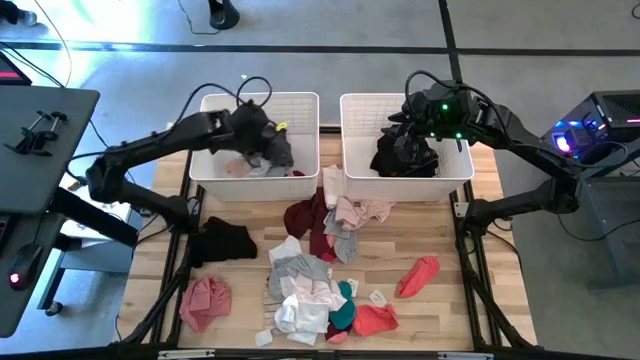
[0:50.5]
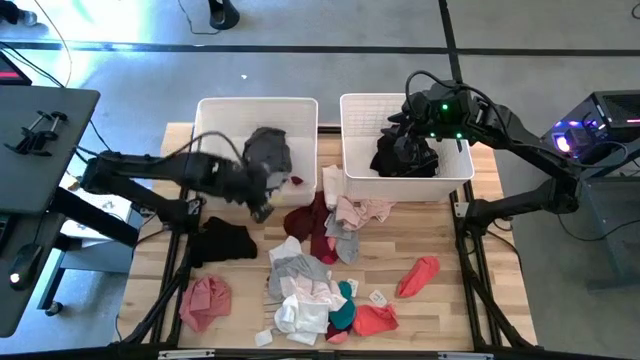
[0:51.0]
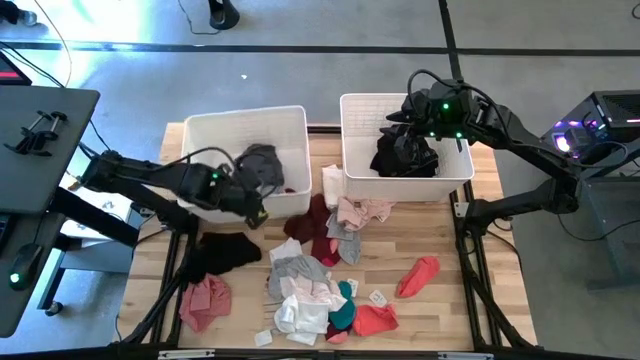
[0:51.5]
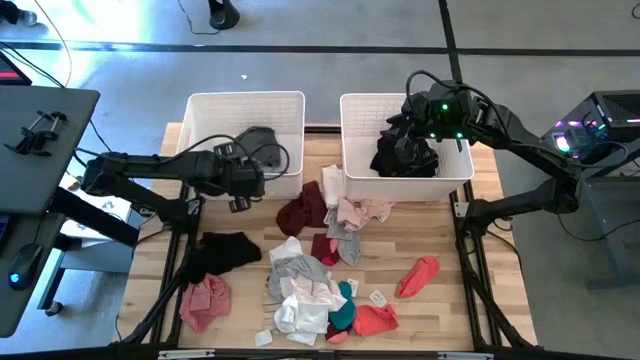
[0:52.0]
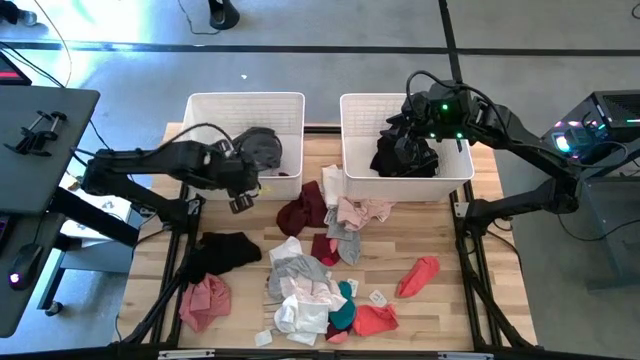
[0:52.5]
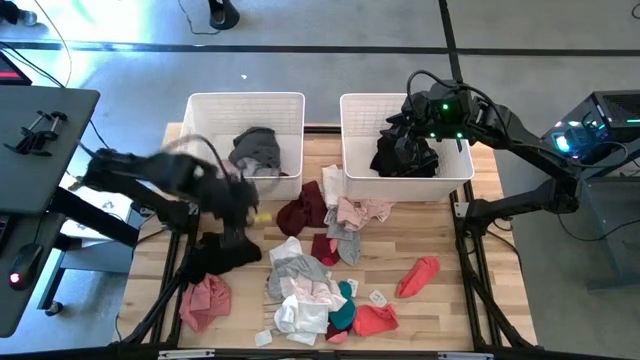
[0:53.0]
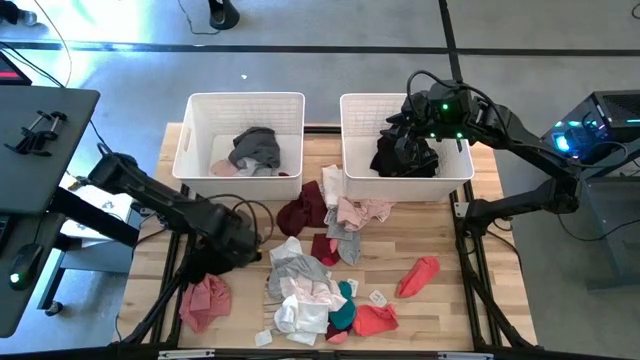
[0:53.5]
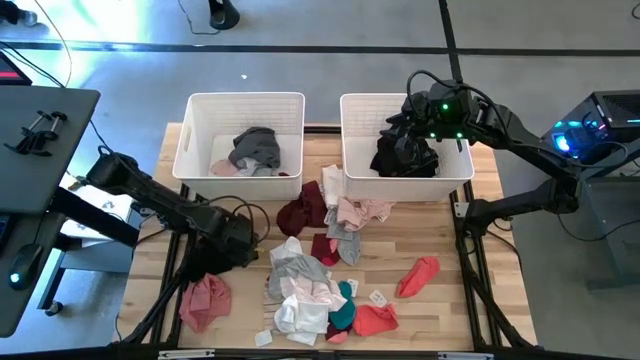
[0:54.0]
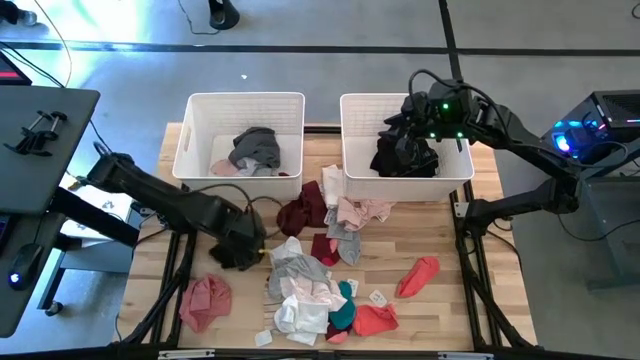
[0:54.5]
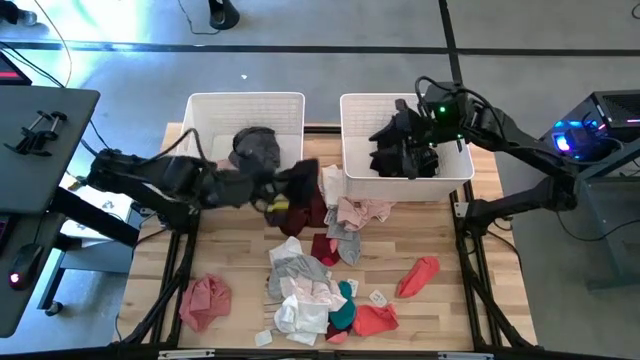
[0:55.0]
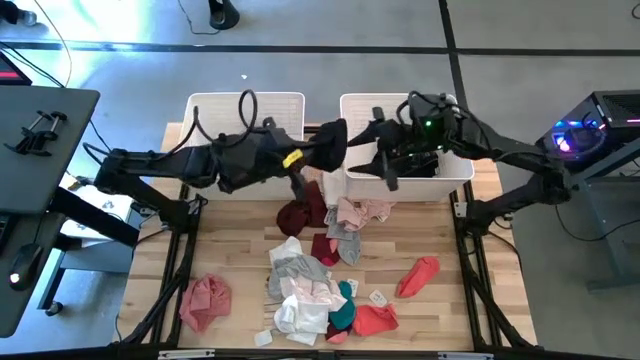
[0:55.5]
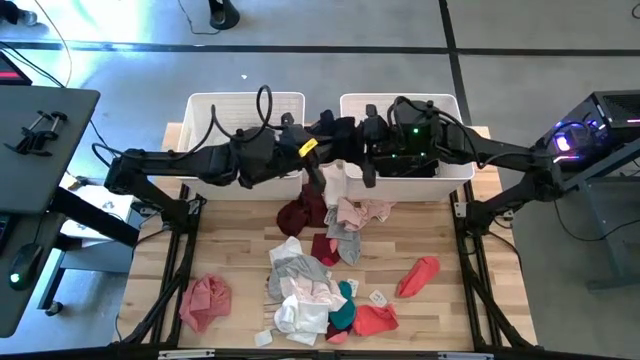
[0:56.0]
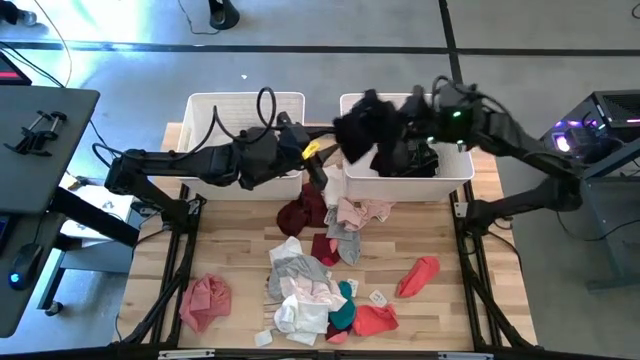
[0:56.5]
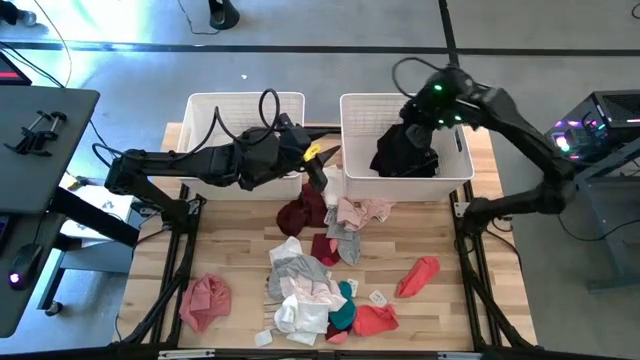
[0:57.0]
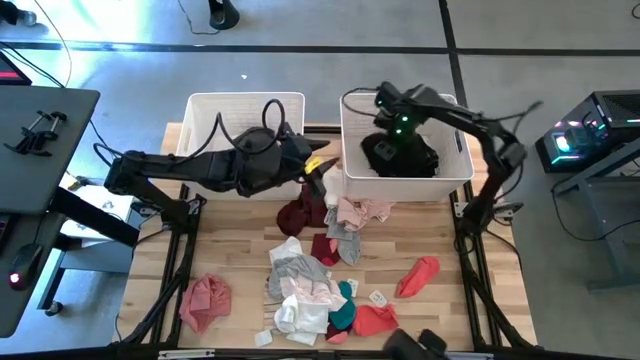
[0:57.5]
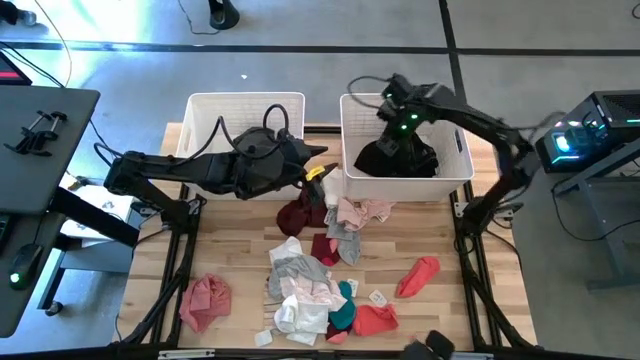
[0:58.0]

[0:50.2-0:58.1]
Task: Sort clothes
Put the black underwear into the right white laundry bin

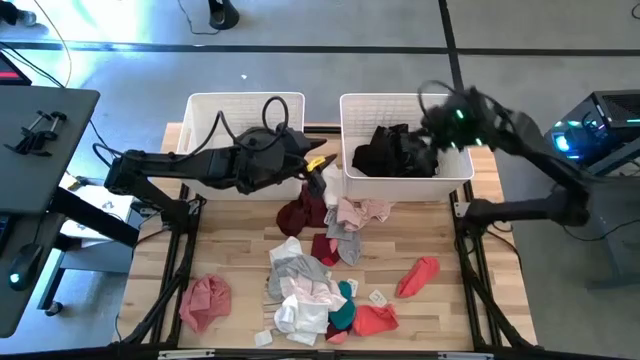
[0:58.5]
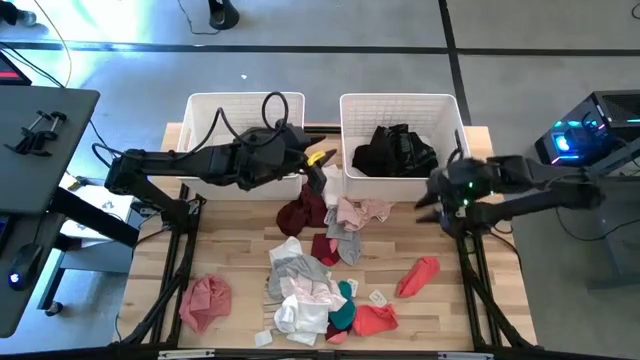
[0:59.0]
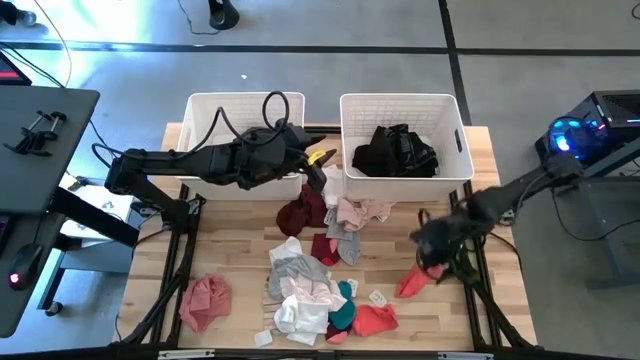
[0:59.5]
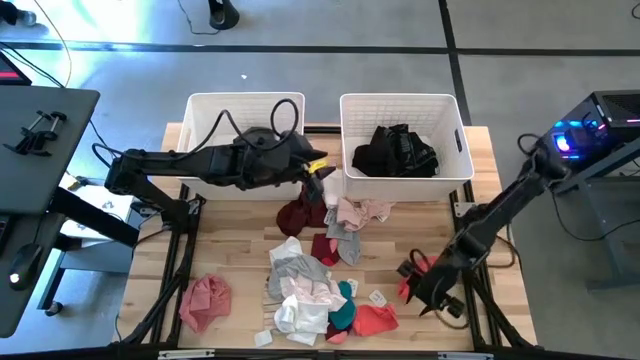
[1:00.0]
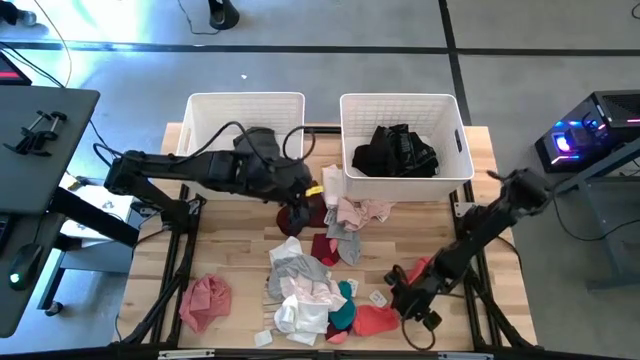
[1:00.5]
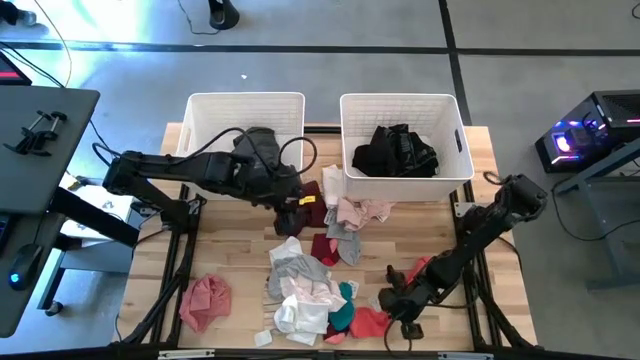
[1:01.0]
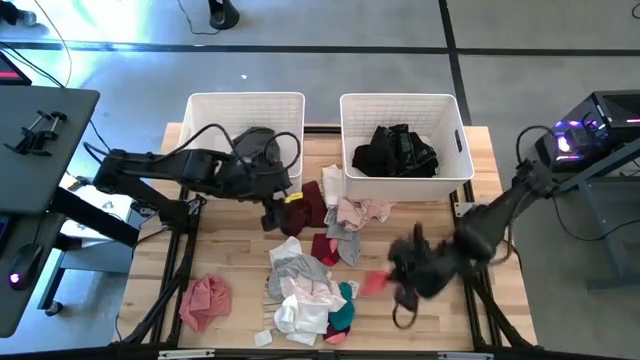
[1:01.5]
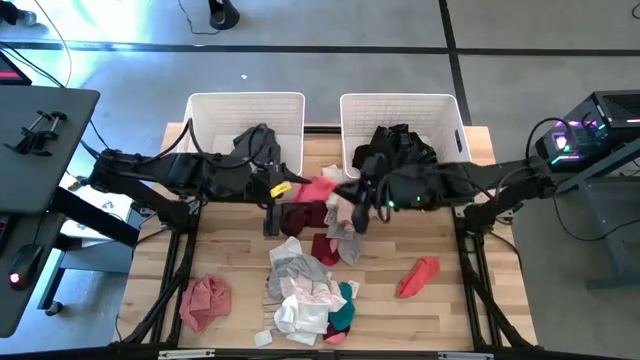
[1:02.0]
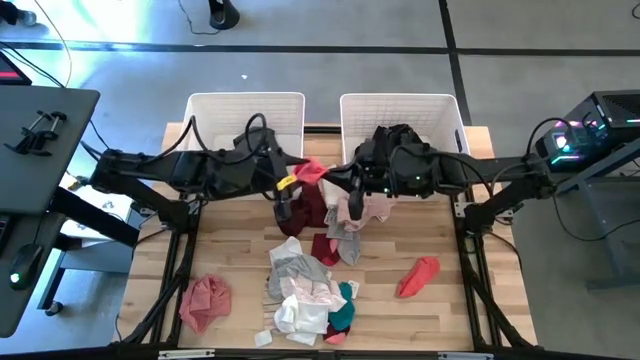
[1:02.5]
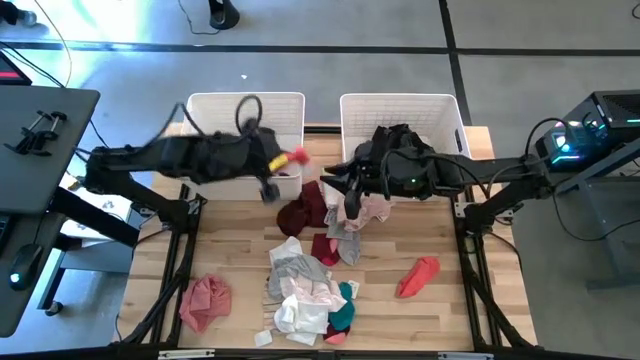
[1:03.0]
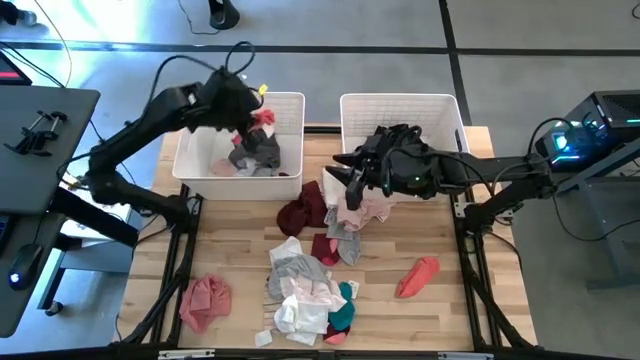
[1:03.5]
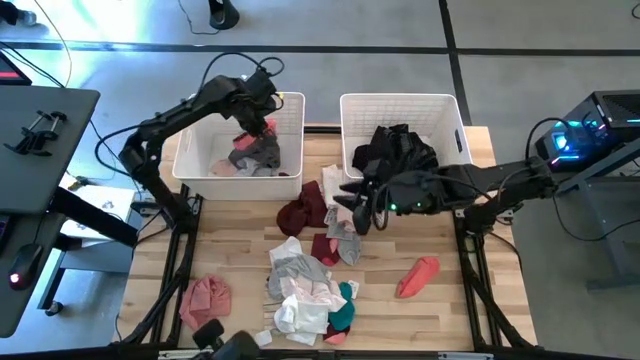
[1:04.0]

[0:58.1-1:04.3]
Put the orange sock into the left white laundry bin

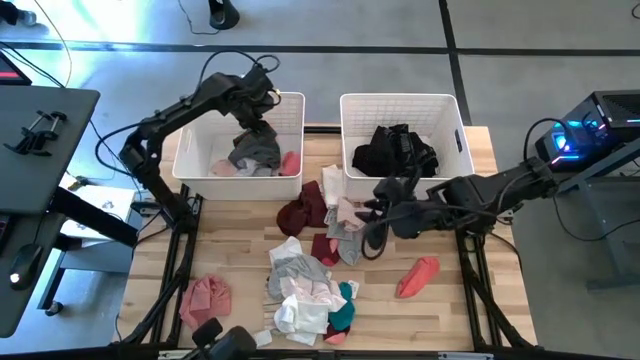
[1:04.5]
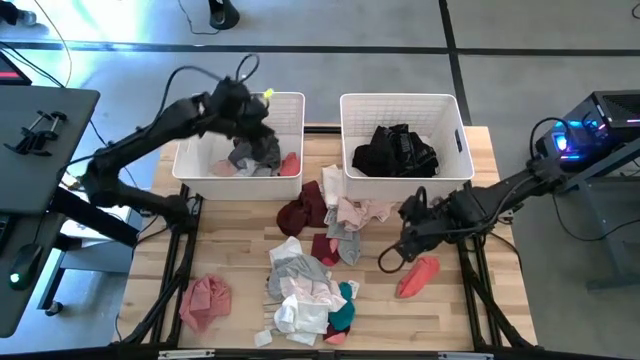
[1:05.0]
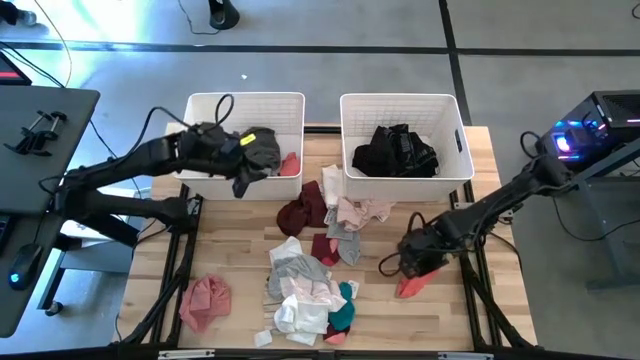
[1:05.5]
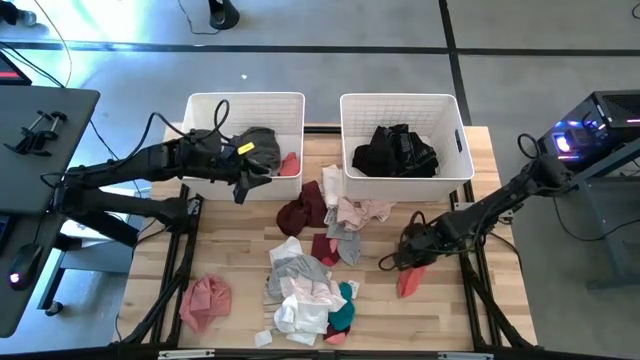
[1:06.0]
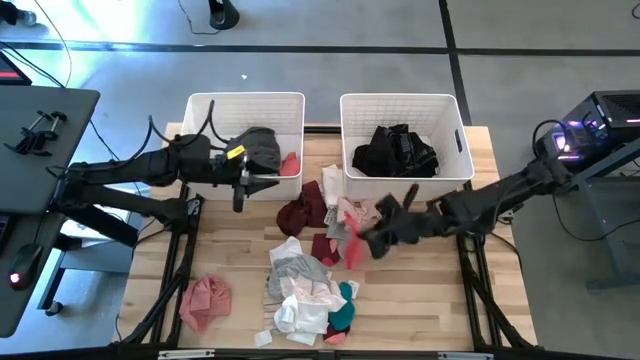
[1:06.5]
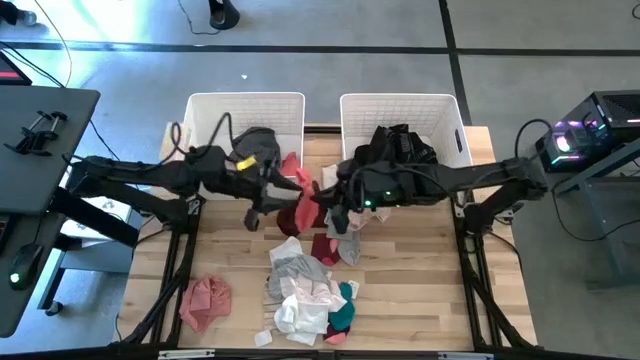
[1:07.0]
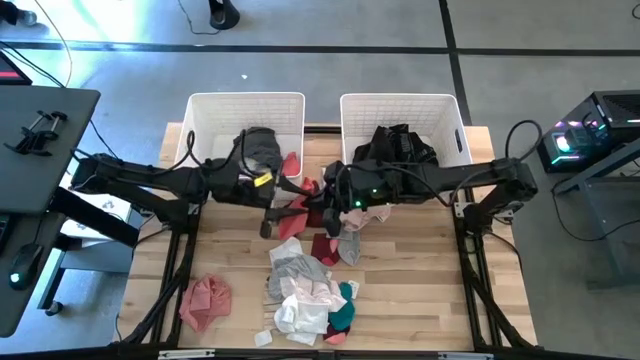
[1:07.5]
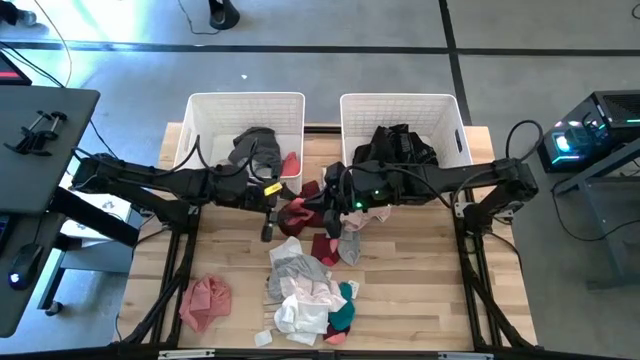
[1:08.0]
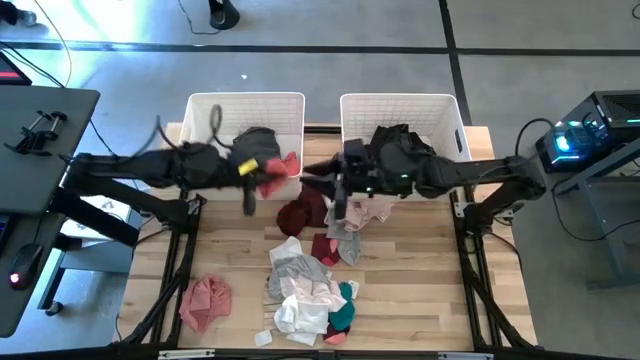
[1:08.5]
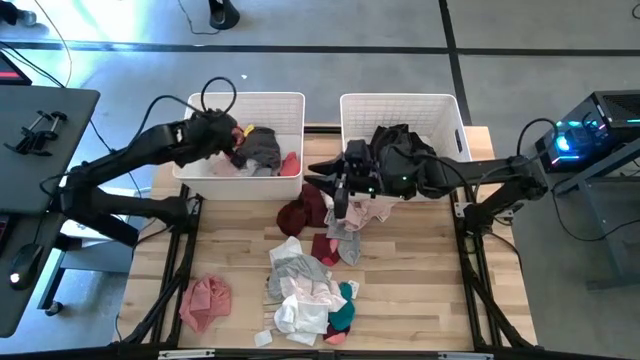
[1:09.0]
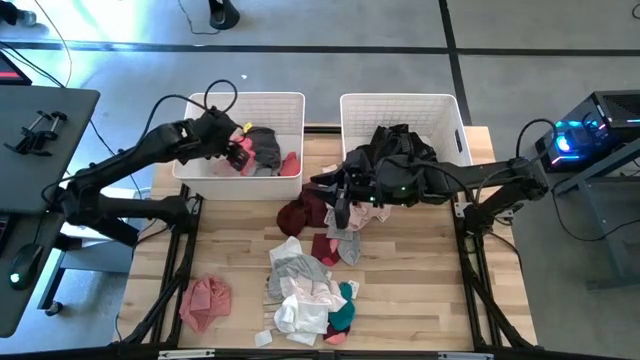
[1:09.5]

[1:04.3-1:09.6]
Put the orange sock into the left white laundry bin

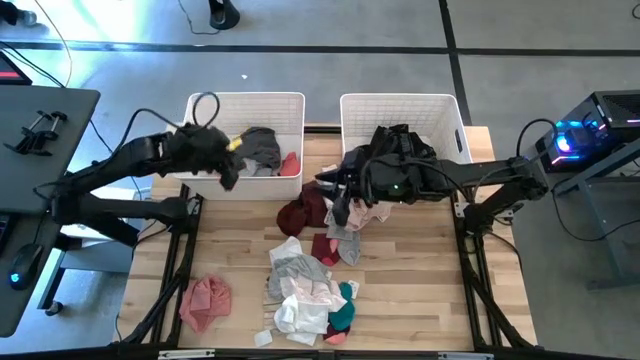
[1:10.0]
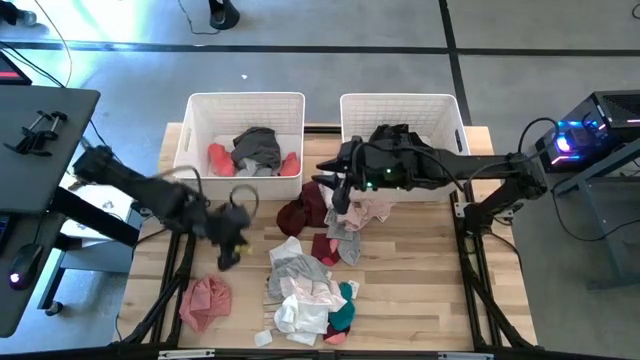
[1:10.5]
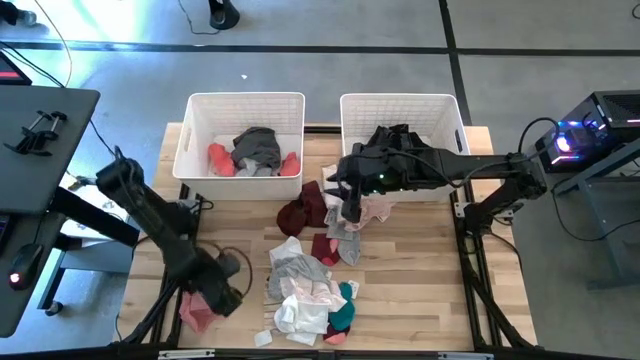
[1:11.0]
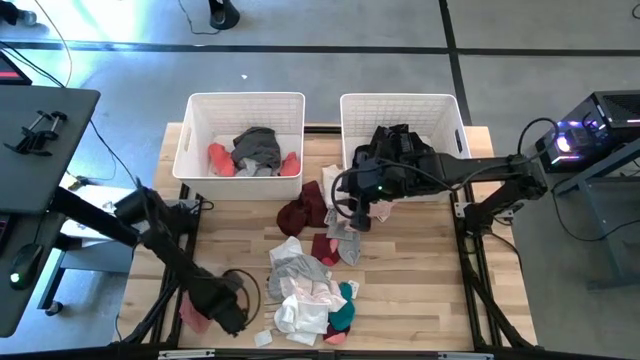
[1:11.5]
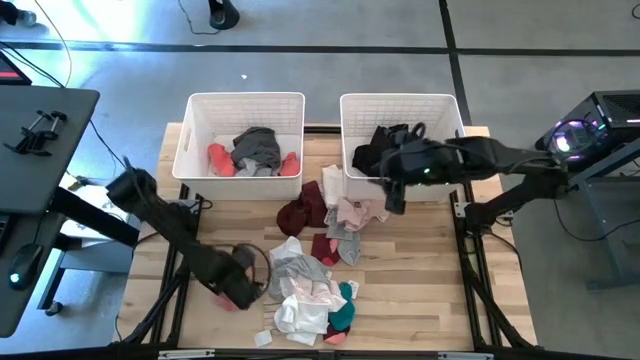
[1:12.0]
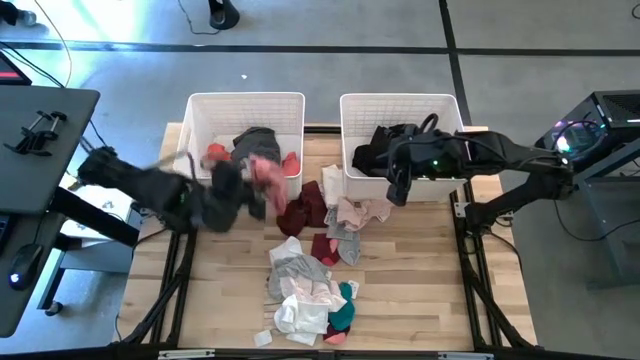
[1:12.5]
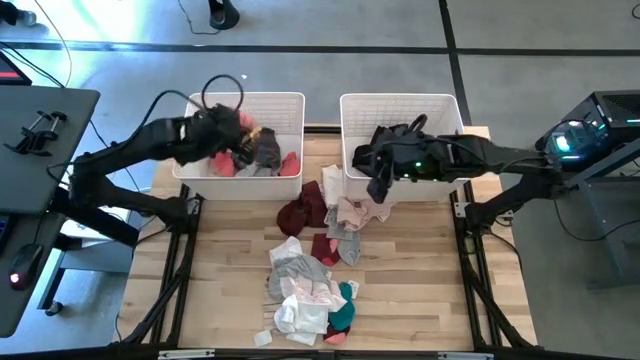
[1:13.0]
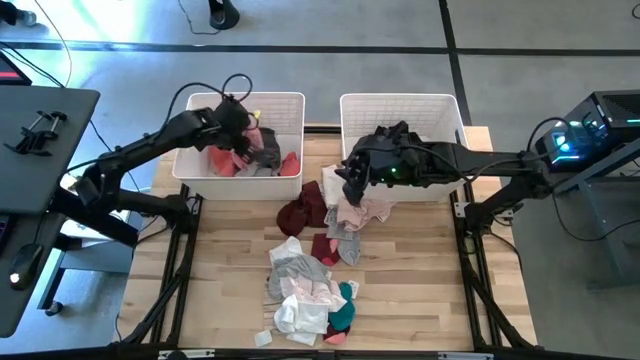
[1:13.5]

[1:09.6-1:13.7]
Put the light red underwear into the left white laundry bin
